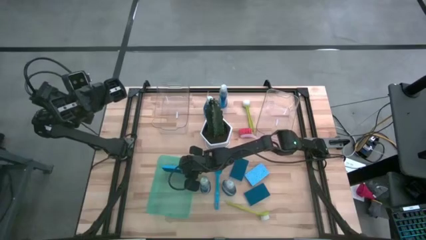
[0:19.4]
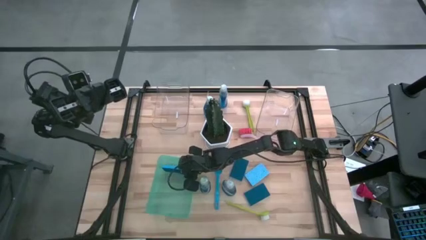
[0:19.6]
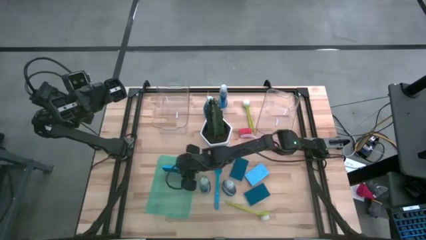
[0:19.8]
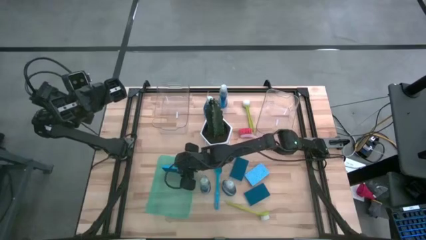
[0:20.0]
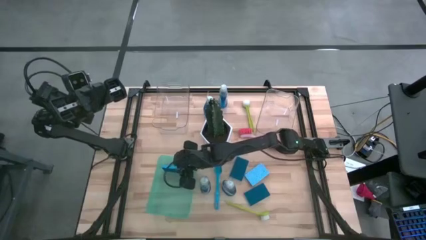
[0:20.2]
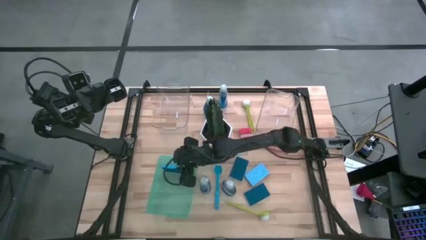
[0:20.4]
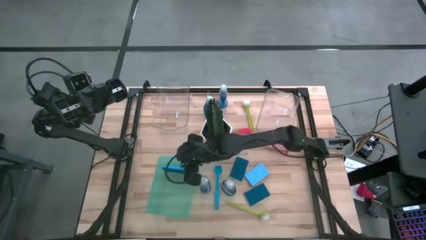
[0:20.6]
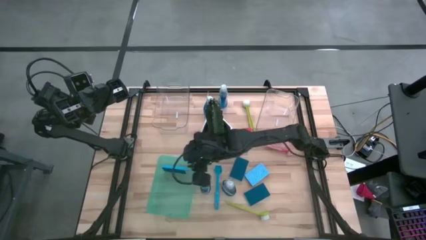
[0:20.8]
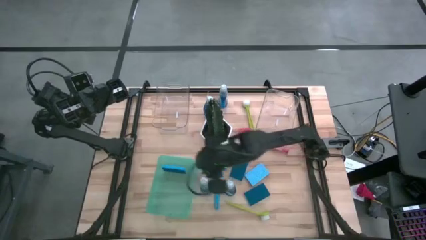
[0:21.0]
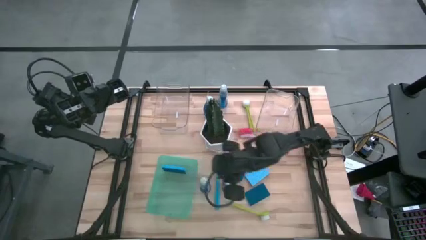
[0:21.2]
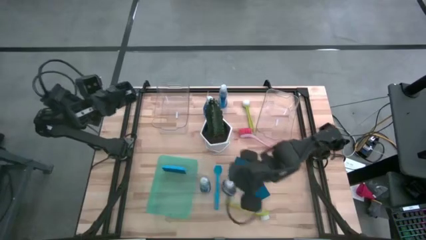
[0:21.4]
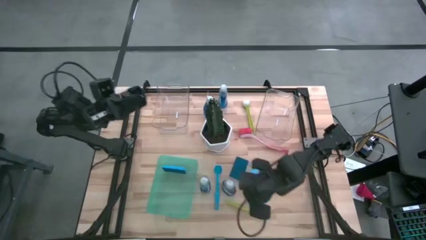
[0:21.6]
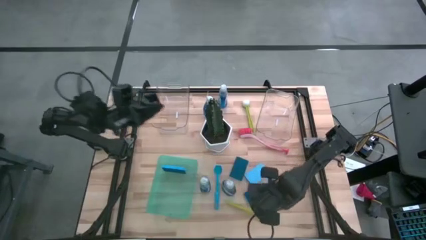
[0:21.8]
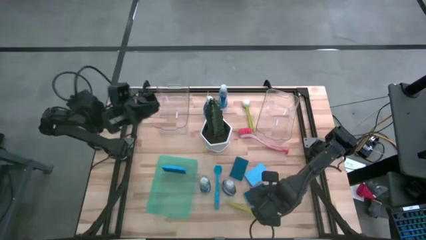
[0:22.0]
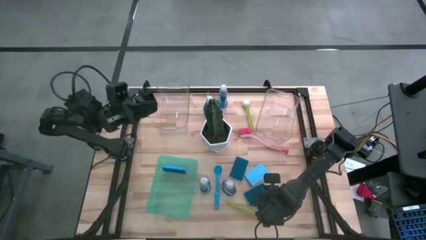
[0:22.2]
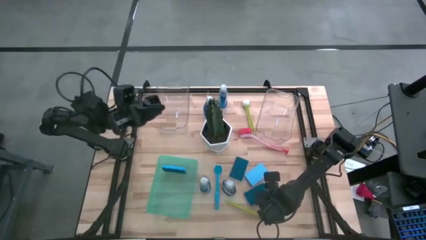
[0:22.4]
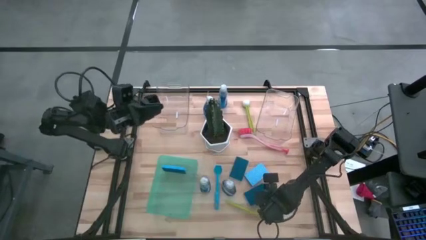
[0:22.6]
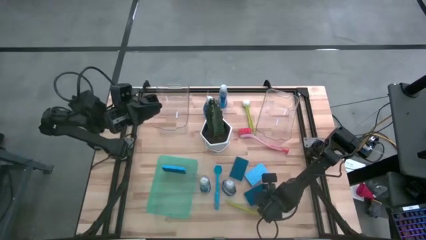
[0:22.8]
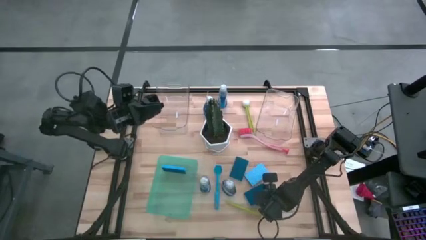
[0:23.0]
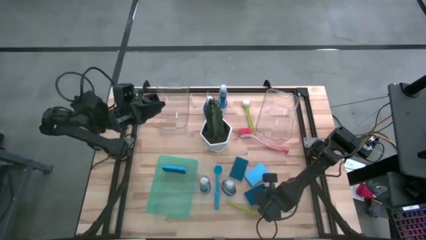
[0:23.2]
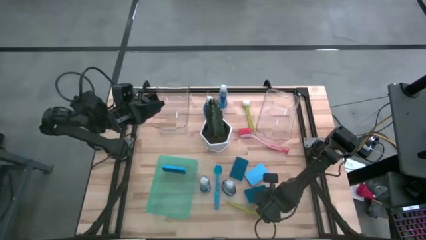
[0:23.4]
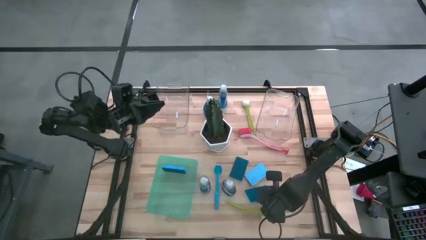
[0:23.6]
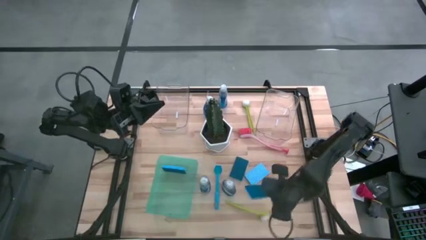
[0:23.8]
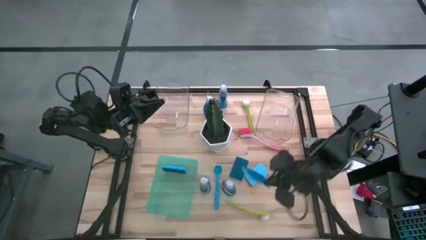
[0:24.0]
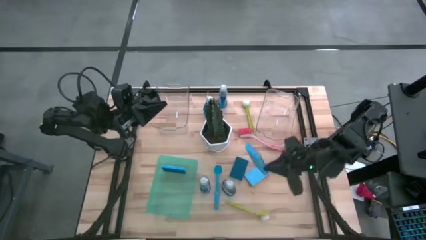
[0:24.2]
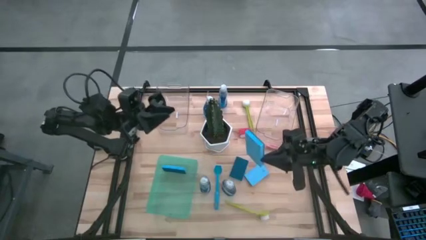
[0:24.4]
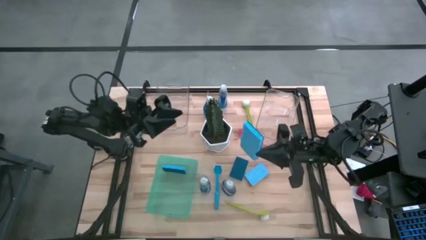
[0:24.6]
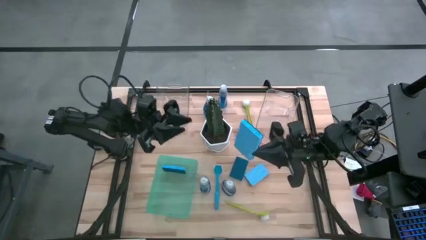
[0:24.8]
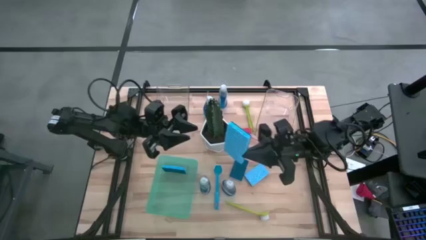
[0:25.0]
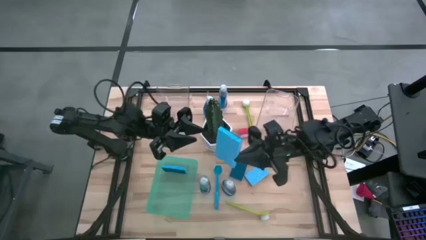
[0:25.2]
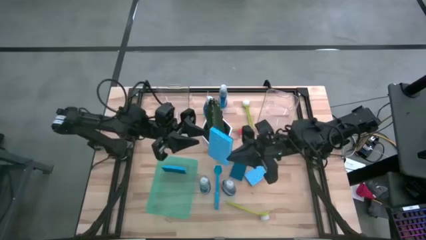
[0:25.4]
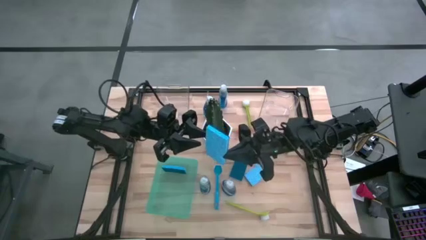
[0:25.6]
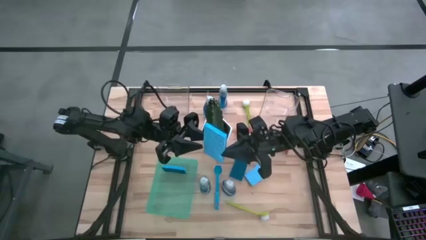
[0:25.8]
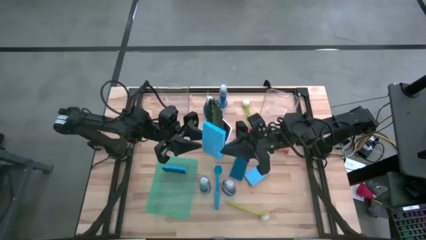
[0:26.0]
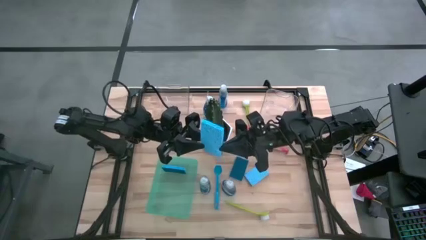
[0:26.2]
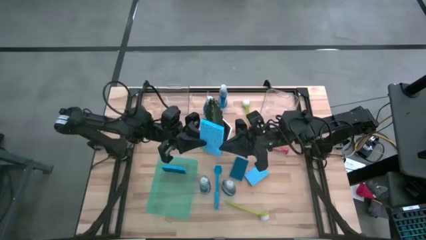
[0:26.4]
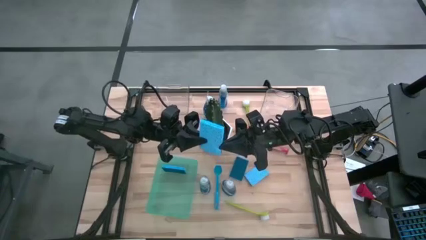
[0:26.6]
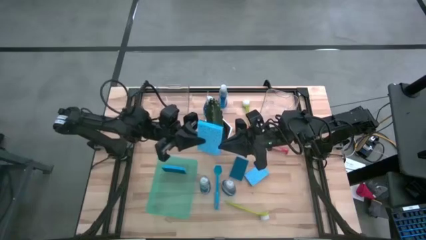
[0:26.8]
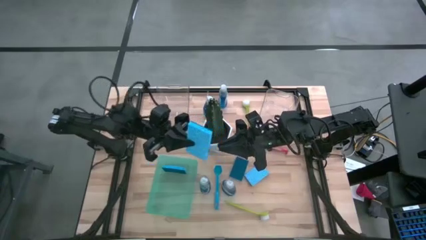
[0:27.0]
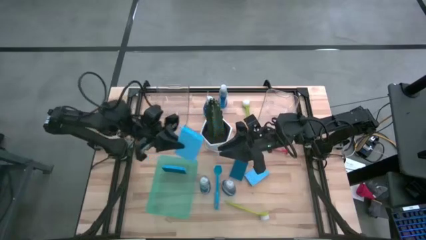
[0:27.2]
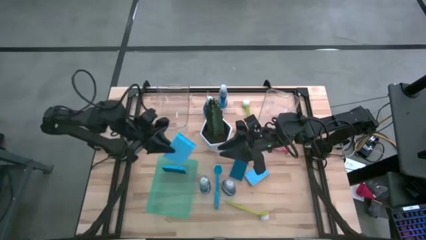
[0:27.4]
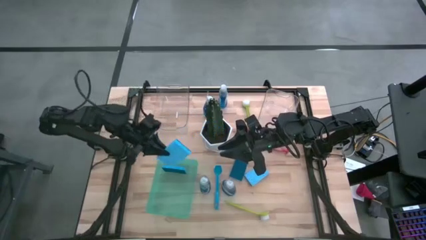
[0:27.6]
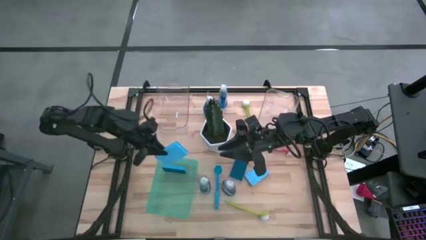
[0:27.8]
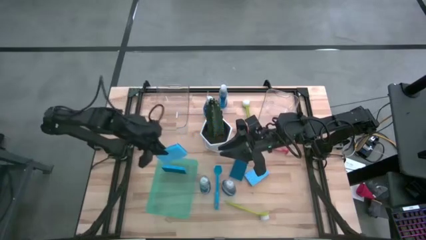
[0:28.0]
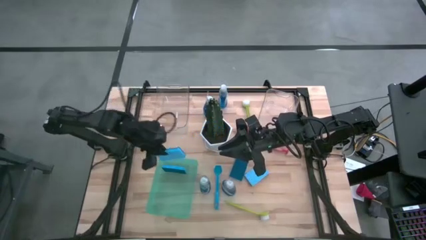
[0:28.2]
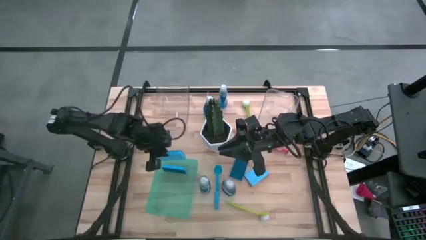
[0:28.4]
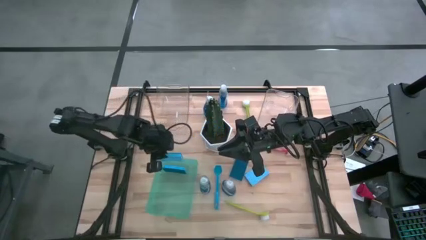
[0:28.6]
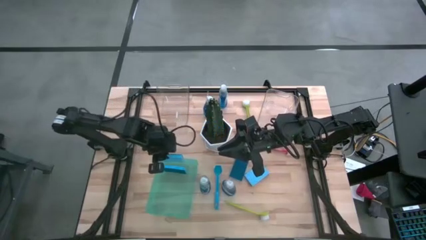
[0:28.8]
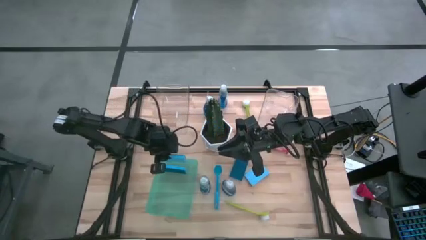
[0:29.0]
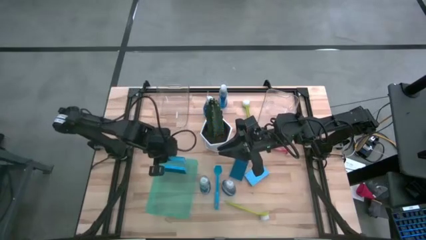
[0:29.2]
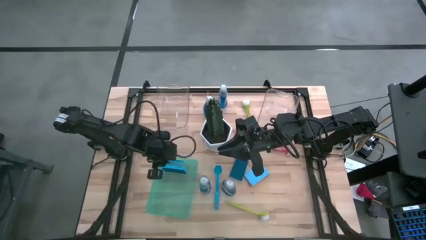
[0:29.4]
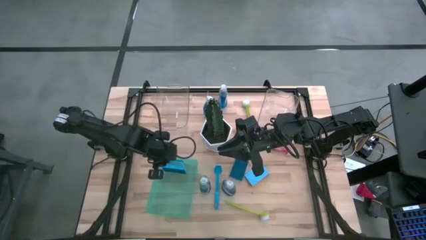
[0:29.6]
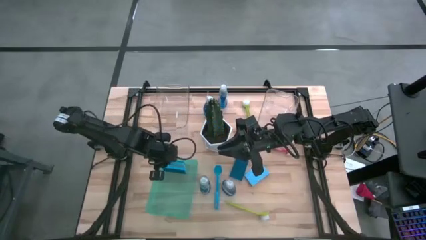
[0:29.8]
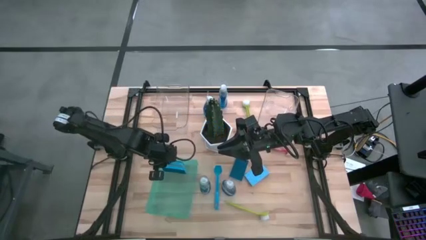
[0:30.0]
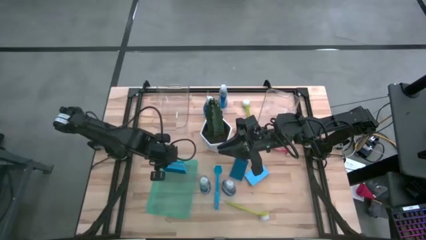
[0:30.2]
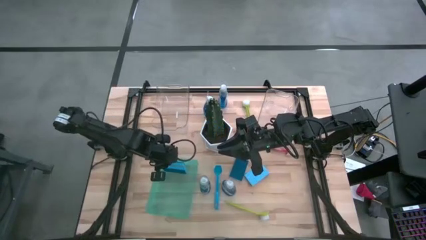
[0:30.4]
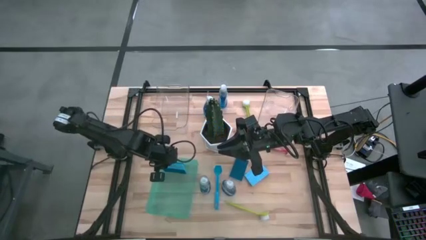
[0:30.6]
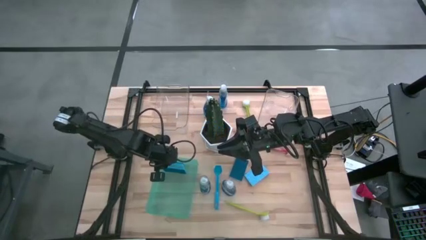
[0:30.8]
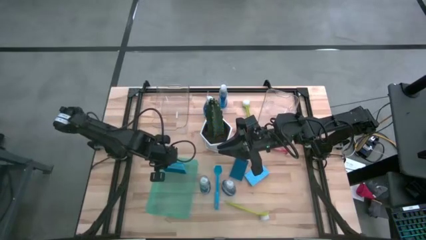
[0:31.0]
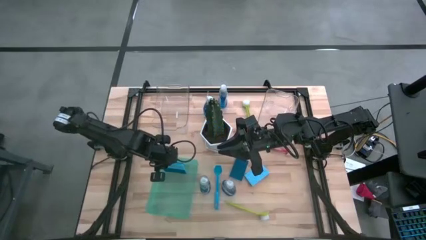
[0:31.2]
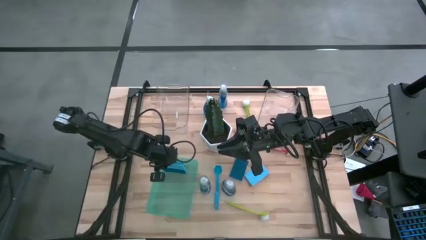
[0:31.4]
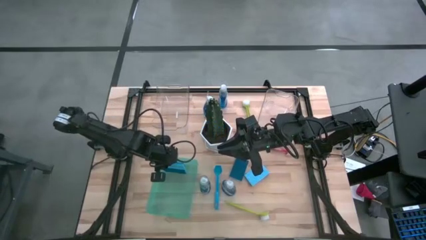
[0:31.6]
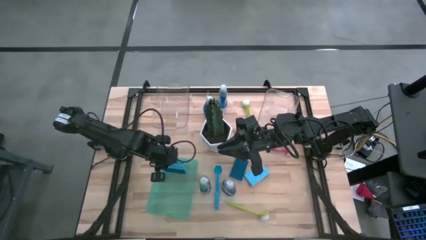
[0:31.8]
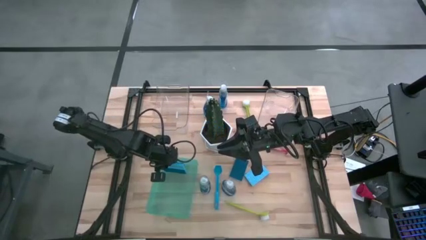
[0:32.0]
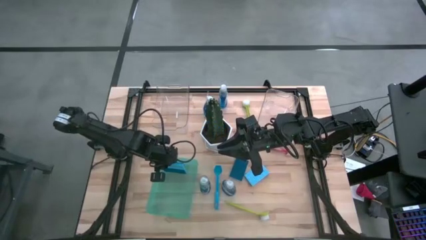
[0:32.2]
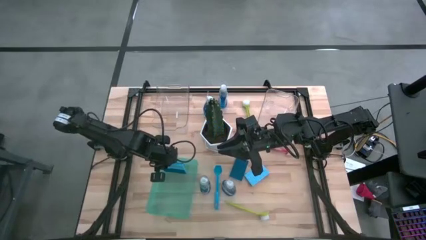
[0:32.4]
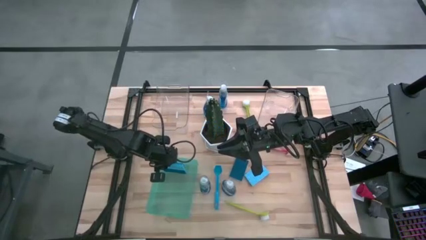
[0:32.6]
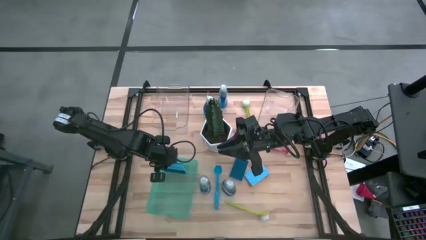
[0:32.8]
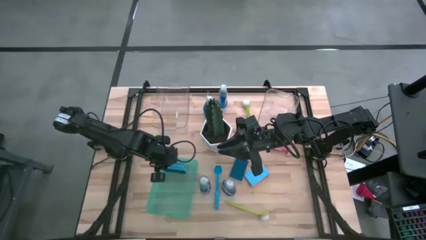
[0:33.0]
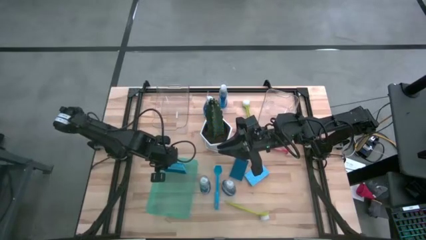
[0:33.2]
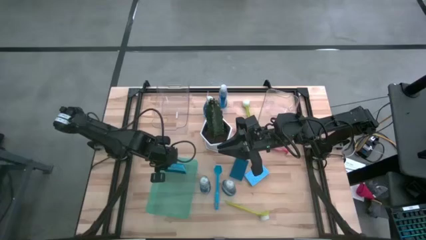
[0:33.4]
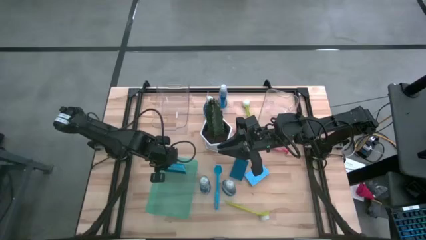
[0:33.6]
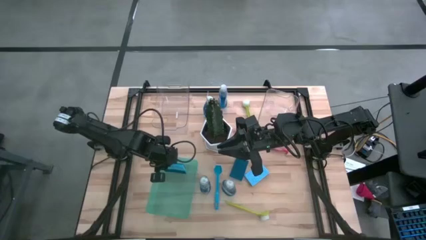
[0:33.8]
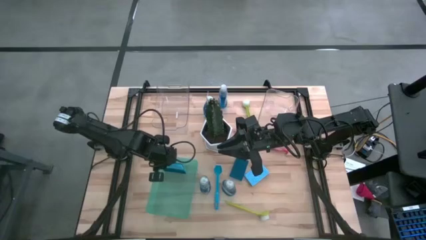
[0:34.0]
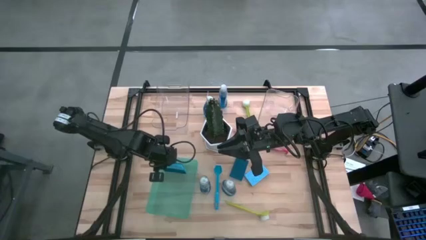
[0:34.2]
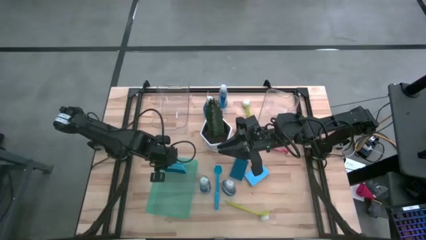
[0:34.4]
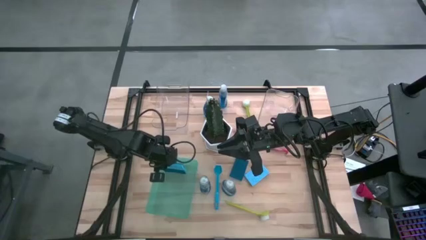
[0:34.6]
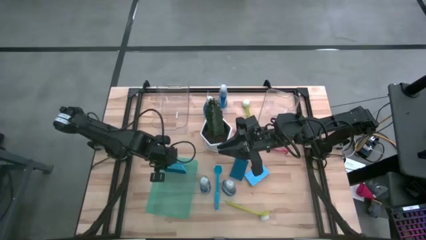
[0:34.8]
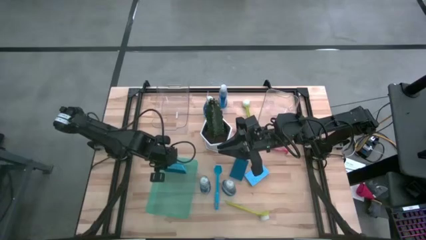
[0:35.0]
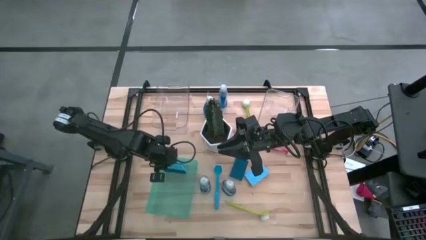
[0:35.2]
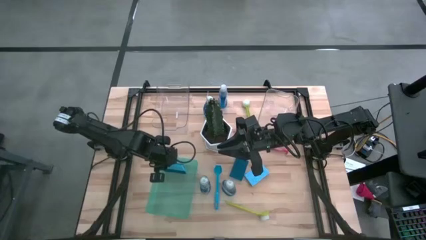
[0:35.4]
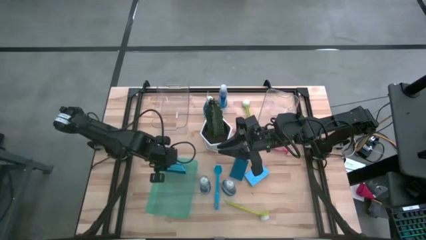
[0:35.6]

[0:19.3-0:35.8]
Task: Pick & Place Kitchen Sink Supplies
Put the blue sponge wipe into the green bin
